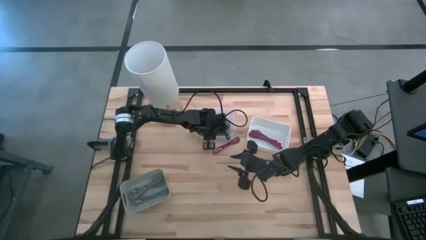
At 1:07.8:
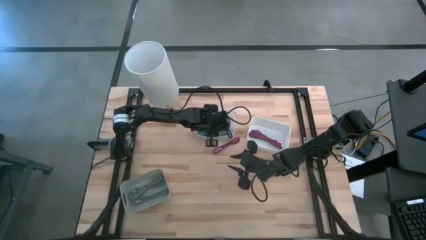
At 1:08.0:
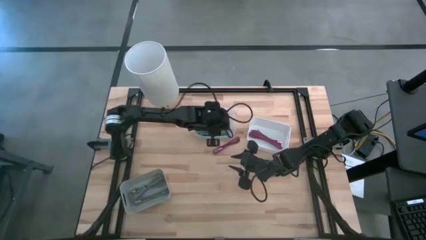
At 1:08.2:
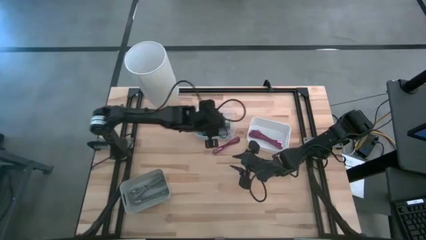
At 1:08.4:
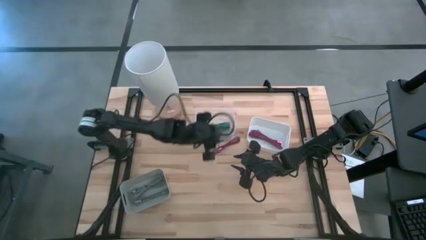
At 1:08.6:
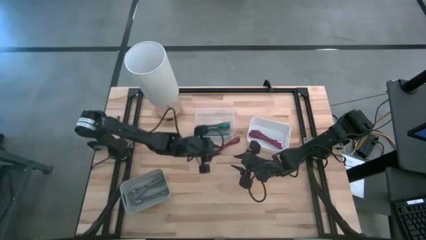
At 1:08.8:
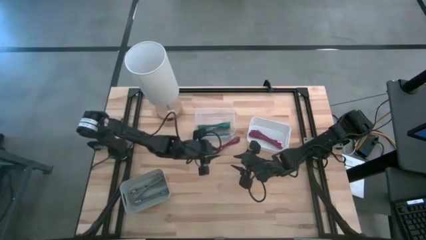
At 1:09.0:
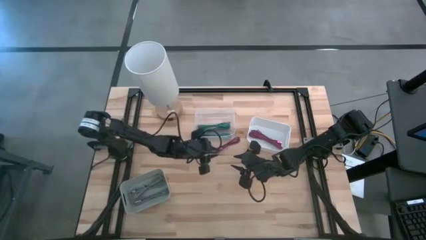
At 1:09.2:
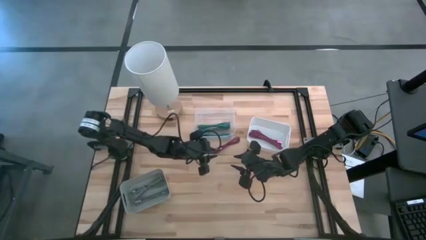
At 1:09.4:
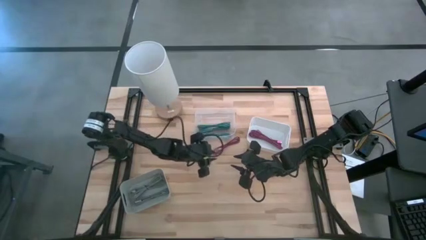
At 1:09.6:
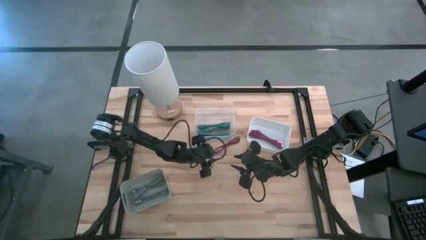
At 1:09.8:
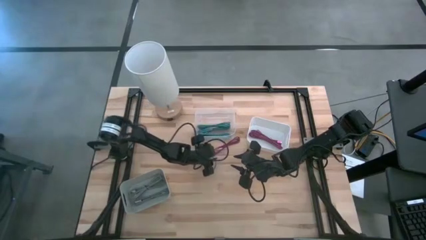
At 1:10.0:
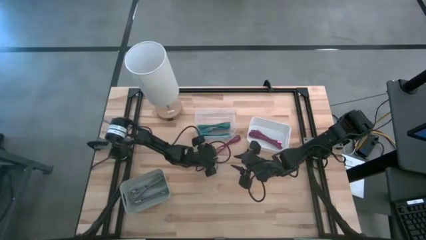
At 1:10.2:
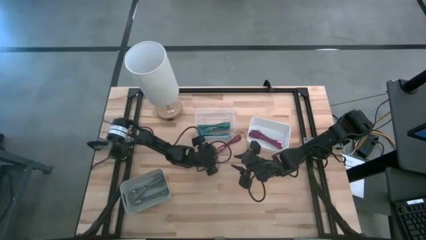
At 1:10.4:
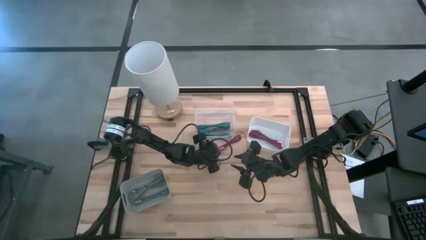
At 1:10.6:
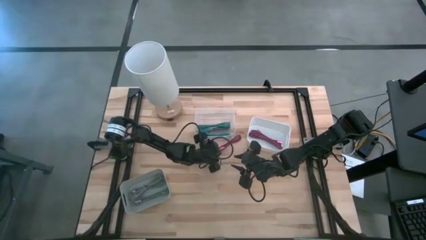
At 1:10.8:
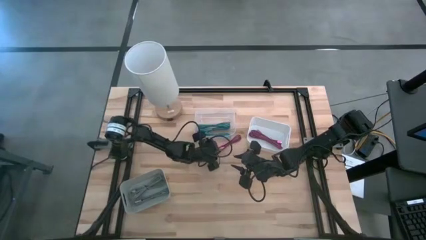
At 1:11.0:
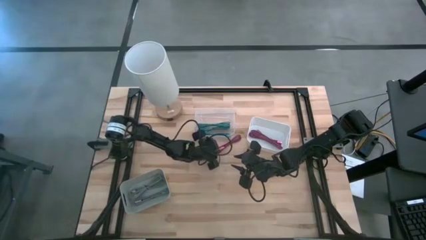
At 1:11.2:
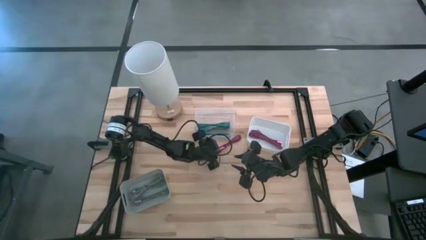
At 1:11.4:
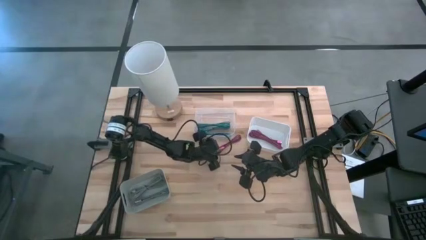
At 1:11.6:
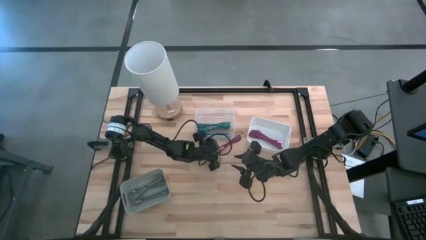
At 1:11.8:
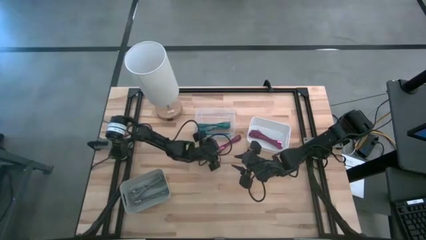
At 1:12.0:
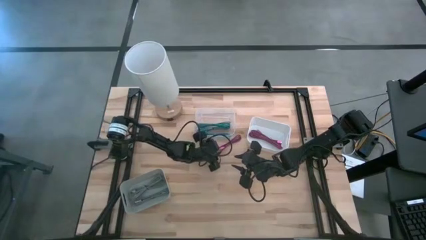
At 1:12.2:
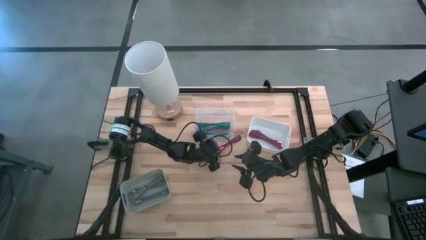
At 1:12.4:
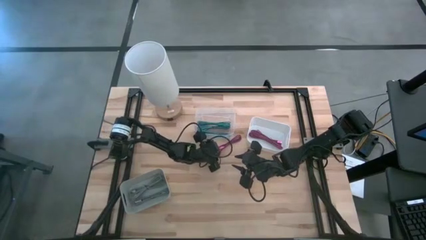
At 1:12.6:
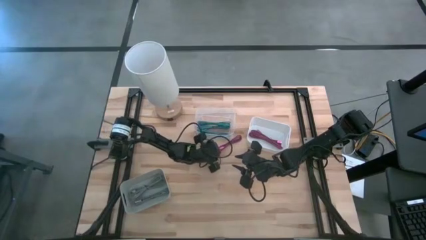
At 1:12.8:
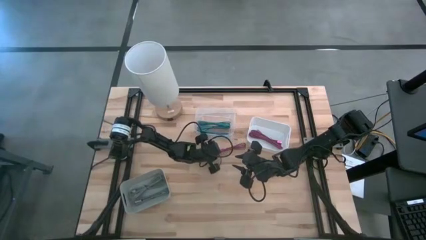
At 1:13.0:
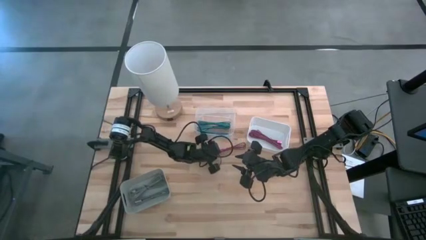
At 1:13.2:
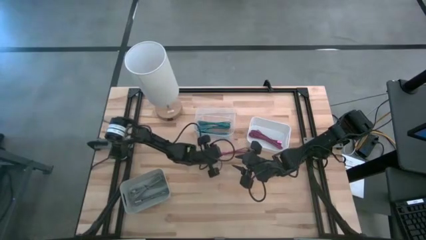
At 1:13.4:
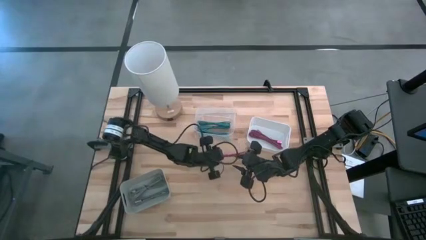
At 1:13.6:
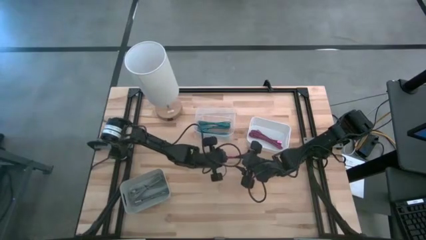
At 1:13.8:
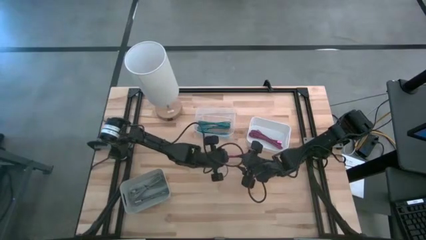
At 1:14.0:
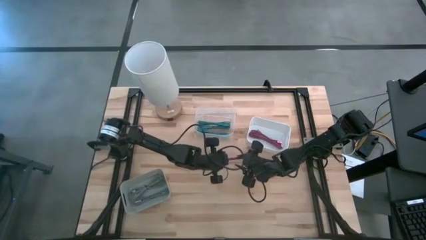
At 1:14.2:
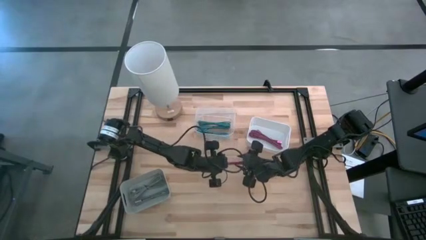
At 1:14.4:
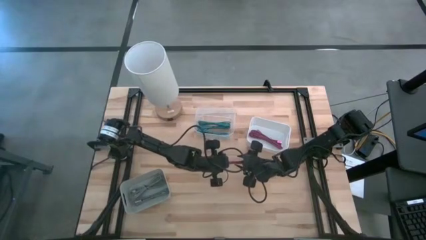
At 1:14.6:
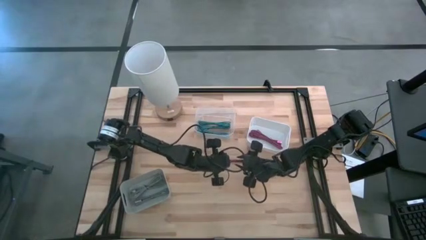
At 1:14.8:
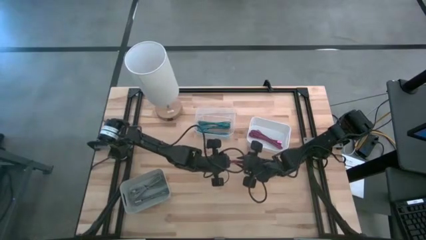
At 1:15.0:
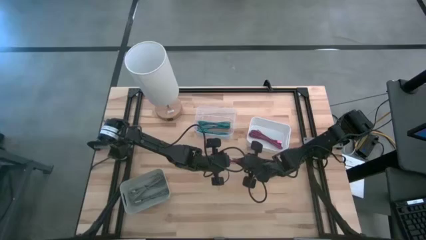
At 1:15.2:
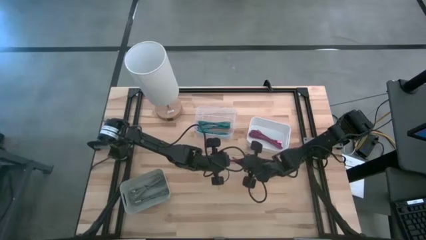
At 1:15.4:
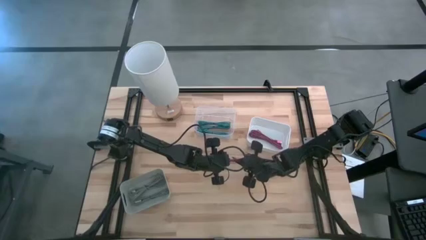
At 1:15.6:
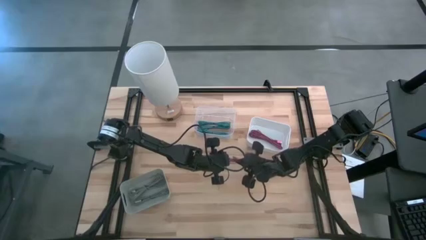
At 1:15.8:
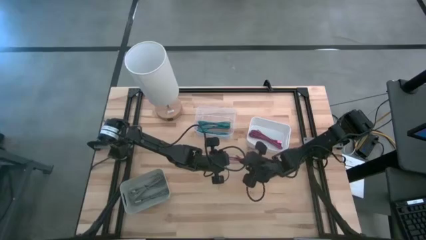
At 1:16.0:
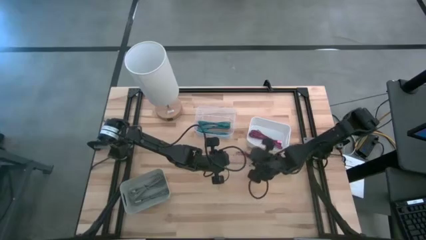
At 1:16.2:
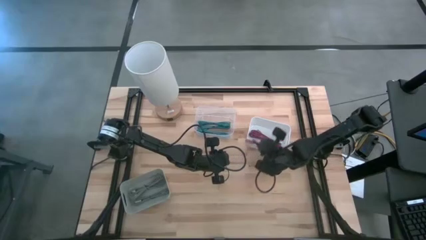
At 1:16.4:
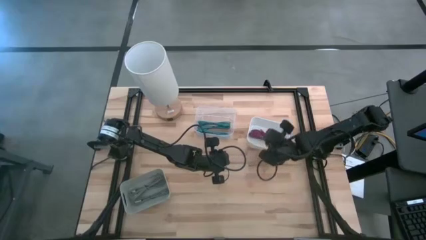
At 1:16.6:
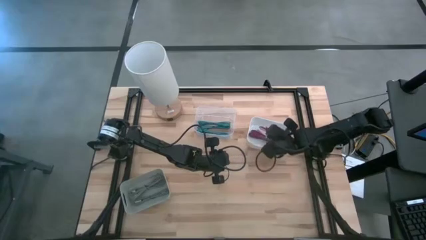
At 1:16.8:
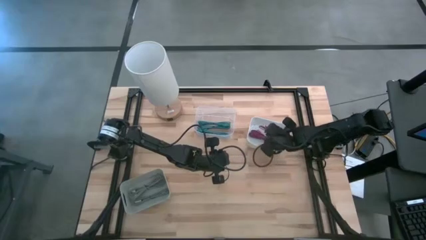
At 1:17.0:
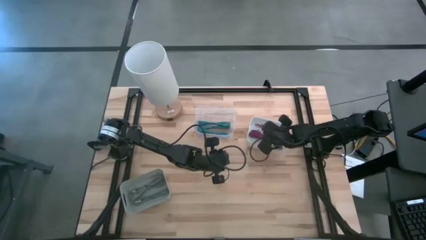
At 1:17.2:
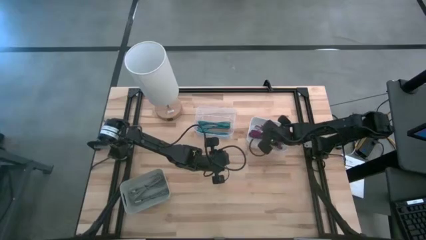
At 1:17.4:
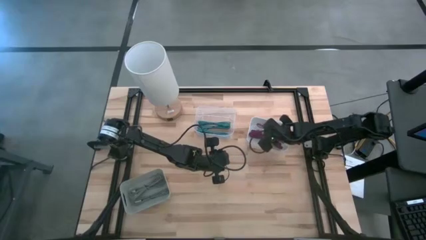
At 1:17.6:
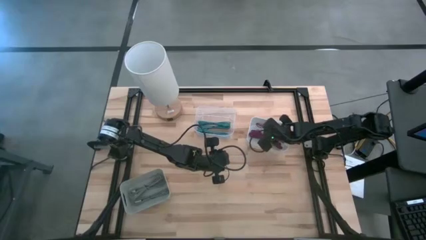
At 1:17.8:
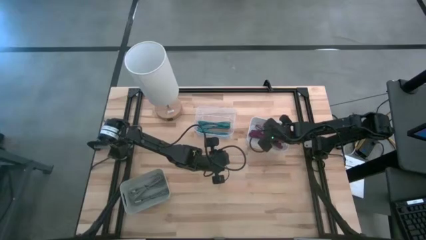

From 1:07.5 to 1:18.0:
Task: Pick & Place USB Port
Put the pink USB cable into the white bin

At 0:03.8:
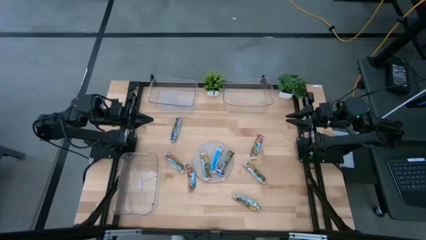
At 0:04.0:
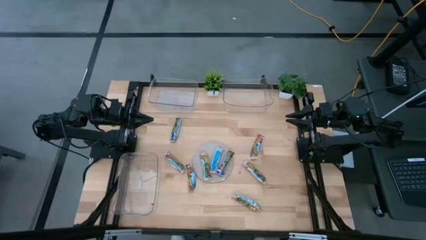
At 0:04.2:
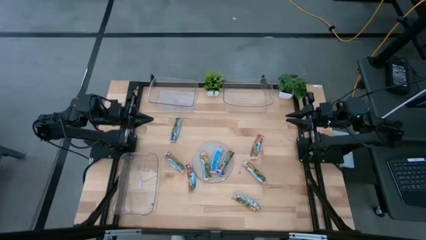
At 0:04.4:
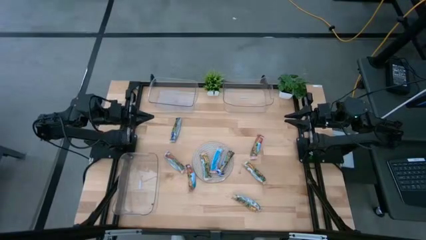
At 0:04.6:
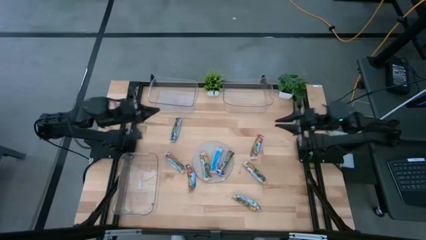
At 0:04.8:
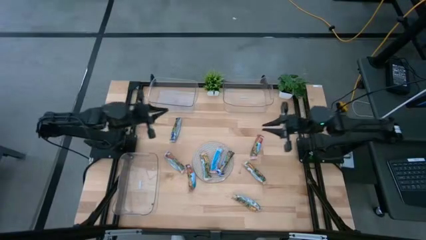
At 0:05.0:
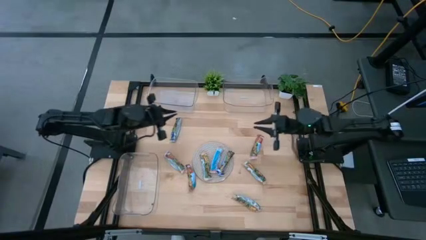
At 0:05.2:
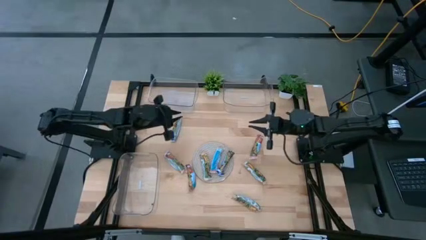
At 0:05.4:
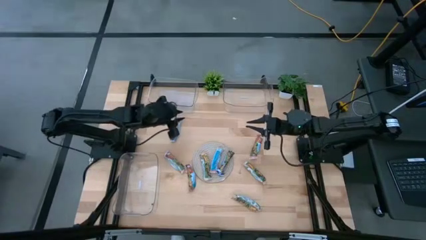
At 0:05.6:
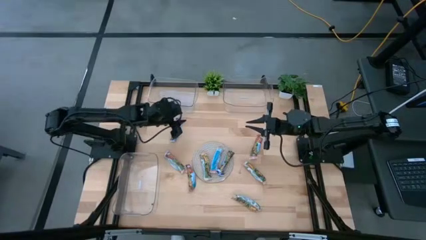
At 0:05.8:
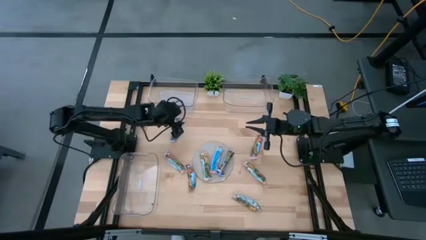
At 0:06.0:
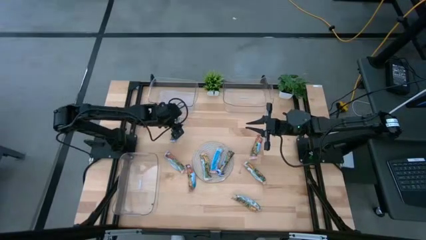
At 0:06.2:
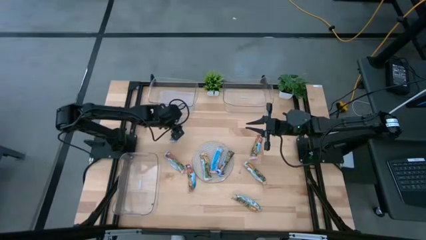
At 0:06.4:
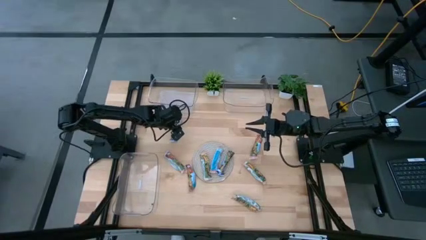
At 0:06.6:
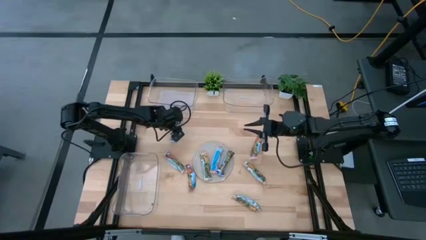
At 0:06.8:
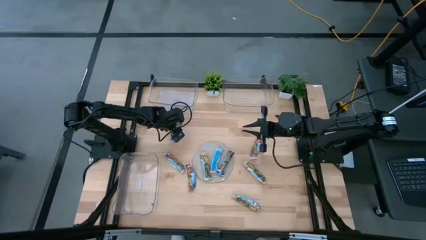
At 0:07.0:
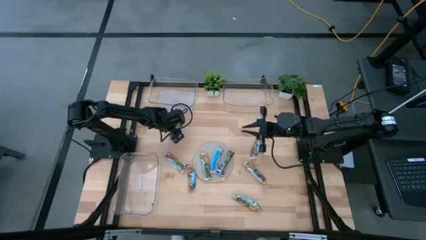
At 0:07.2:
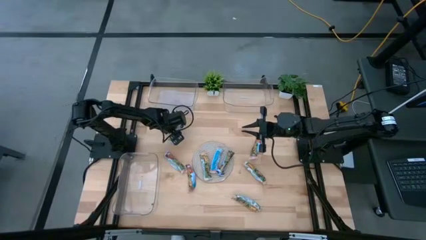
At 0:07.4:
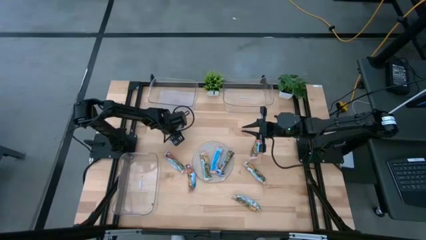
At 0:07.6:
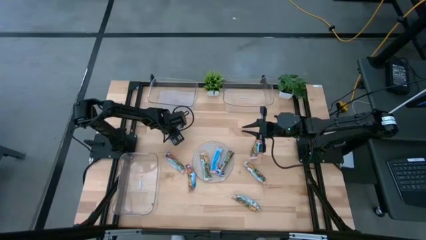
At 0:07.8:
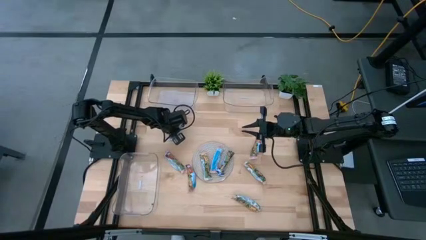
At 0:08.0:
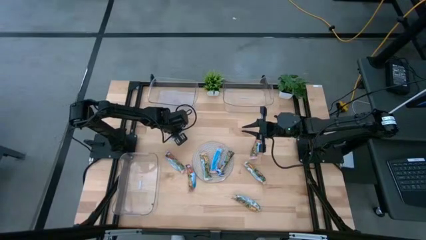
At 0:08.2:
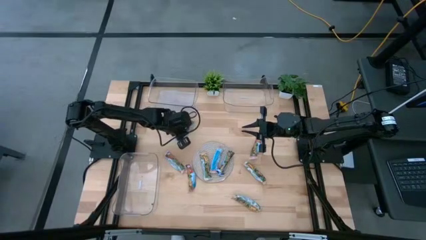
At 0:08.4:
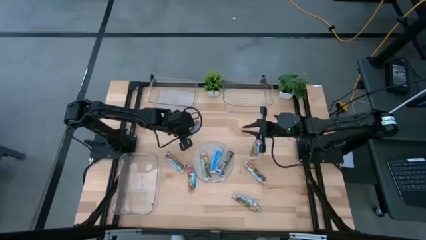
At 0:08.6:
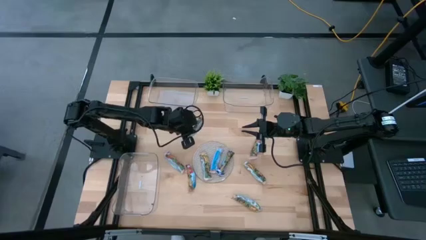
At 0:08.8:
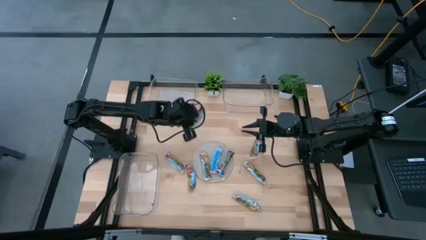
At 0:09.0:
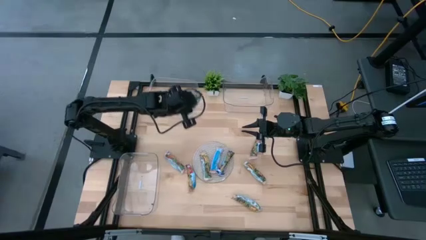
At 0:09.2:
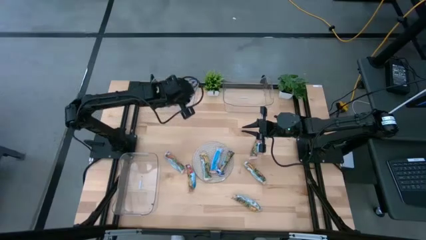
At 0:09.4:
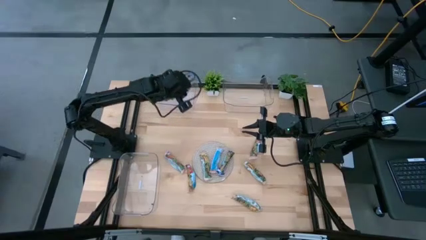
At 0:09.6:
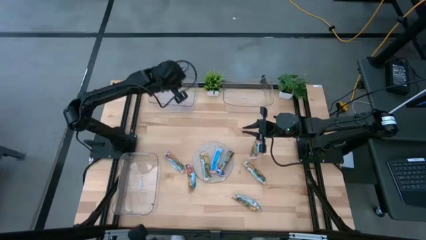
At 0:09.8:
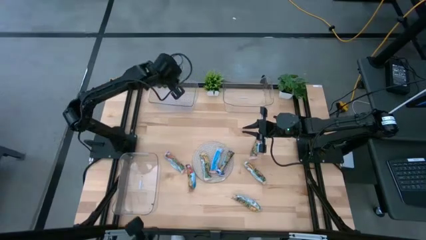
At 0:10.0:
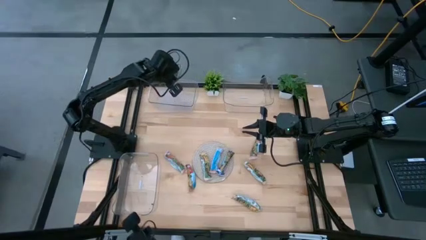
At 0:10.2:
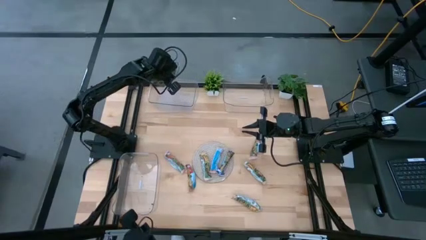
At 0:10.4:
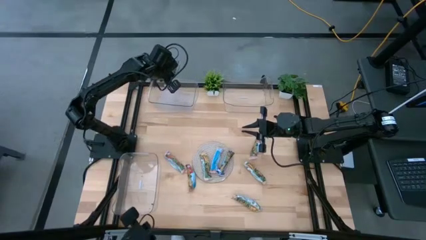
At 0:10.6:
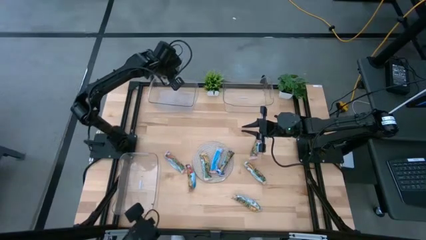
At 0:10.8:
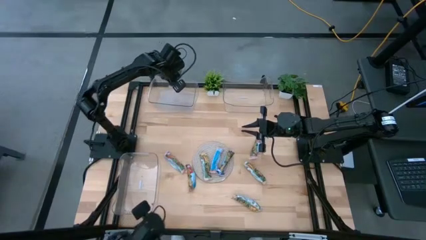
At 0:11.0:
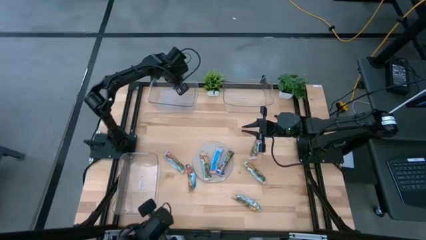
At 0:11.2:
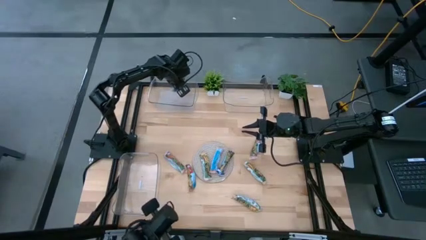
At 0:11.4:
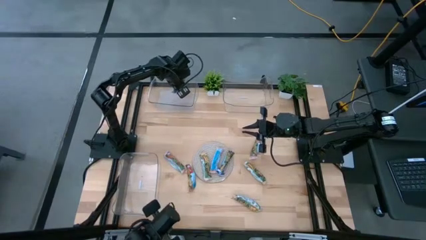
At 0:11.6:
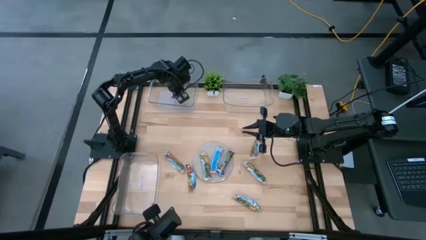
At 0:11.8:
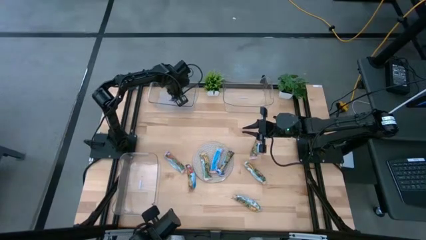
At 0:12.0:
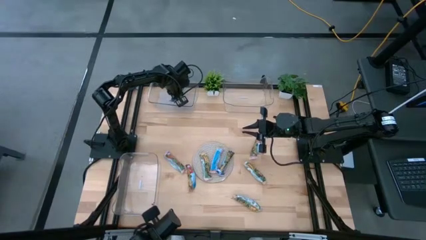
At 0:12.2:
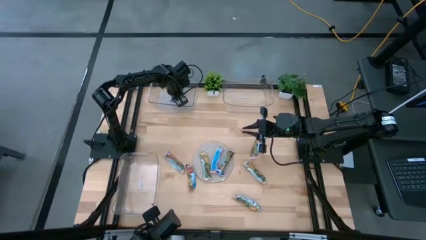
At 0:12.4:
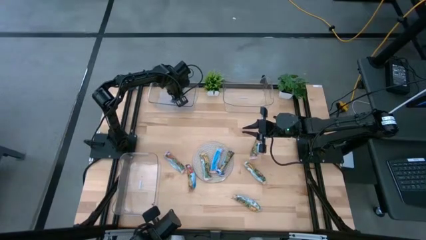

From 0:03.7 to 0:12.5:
Task: Pick and place Granola Bars by type
Put the blue granola bar into the top left transparent bin
